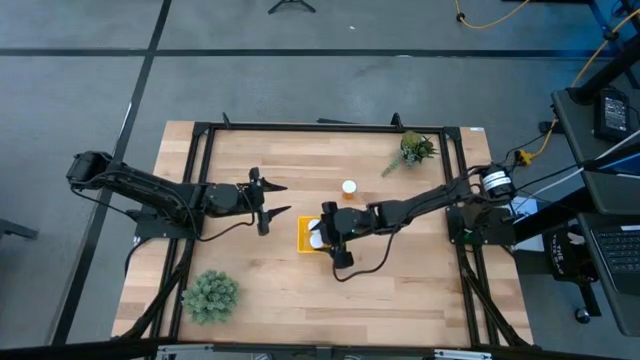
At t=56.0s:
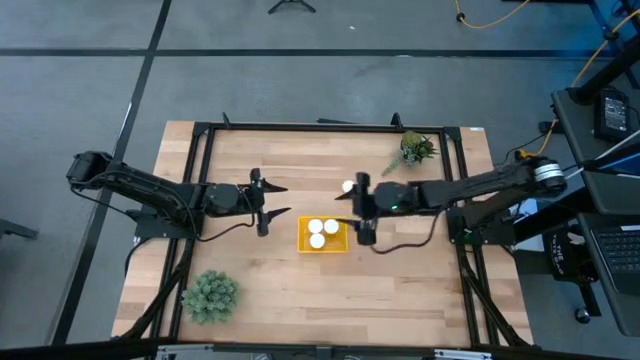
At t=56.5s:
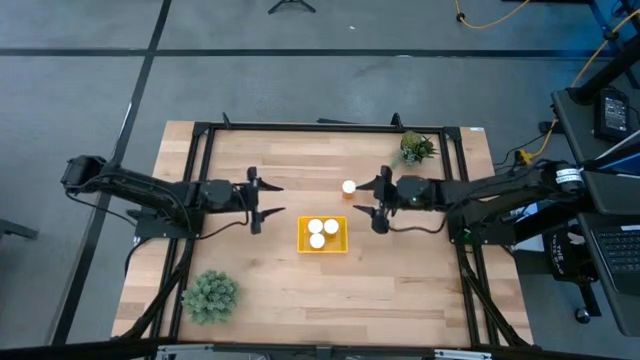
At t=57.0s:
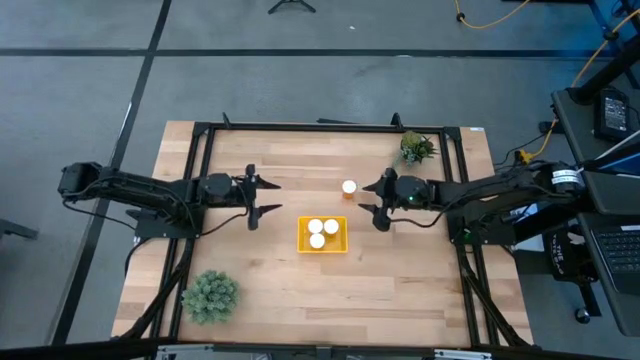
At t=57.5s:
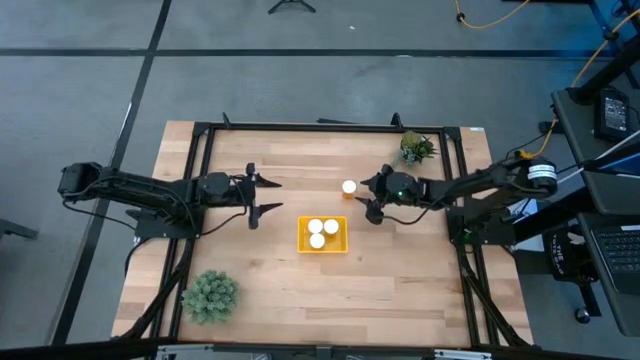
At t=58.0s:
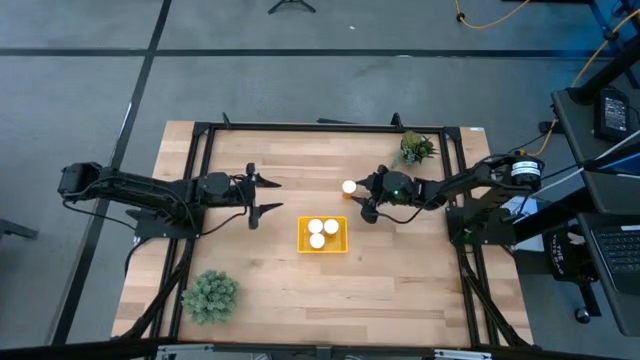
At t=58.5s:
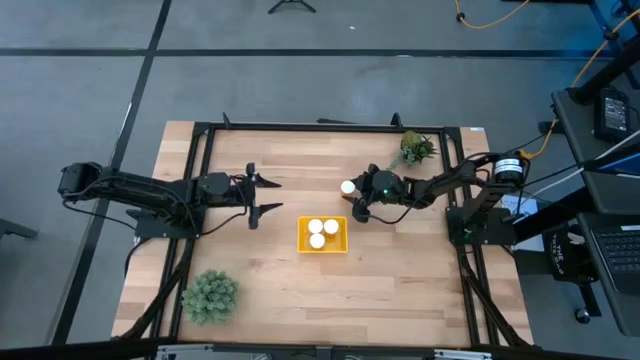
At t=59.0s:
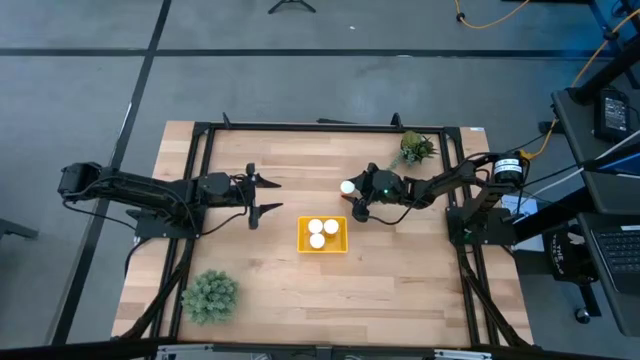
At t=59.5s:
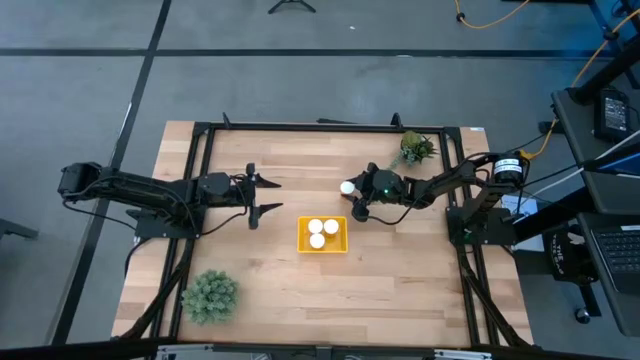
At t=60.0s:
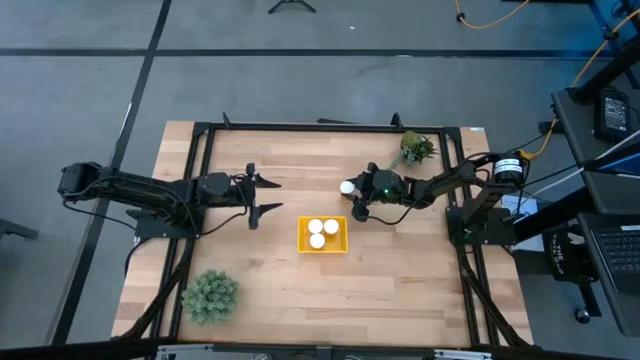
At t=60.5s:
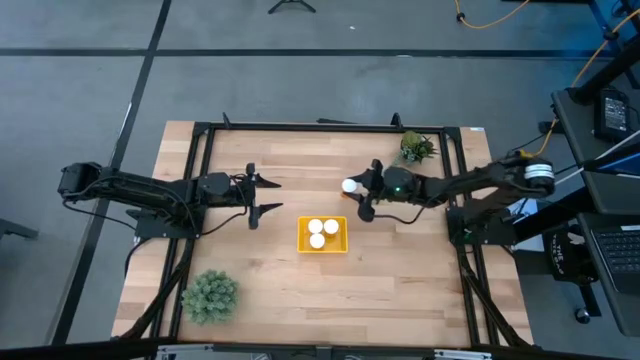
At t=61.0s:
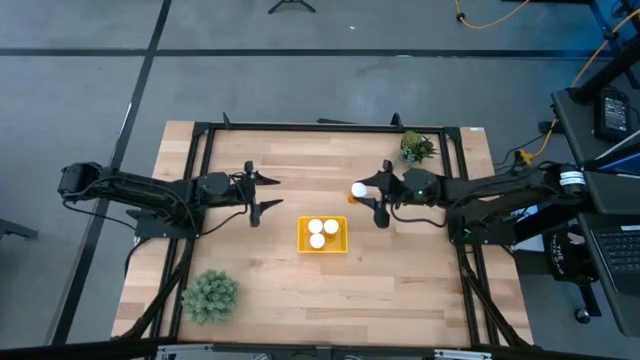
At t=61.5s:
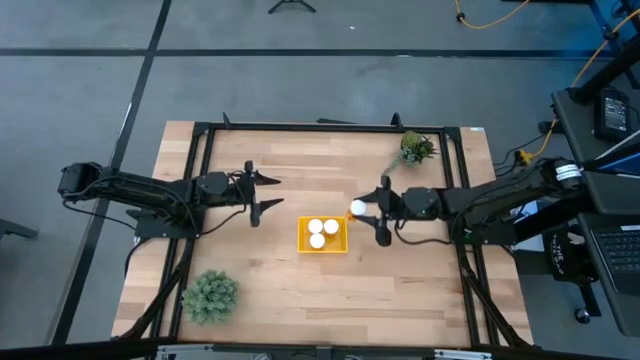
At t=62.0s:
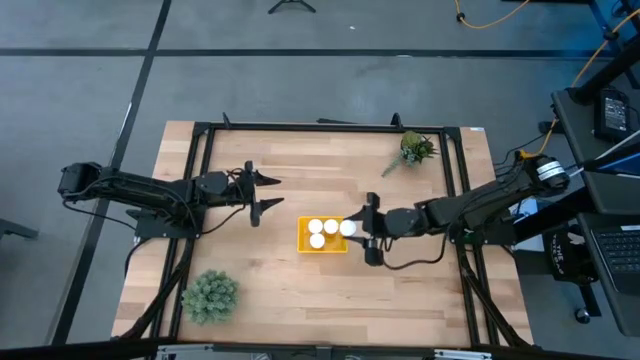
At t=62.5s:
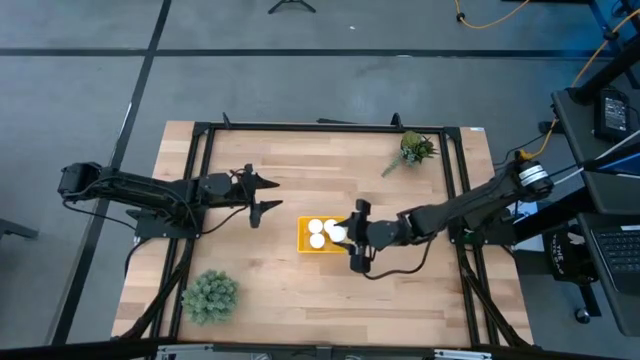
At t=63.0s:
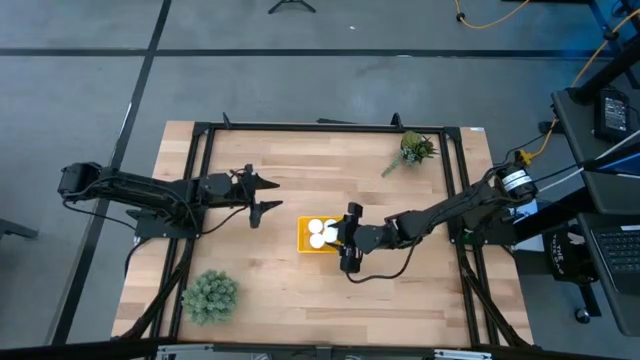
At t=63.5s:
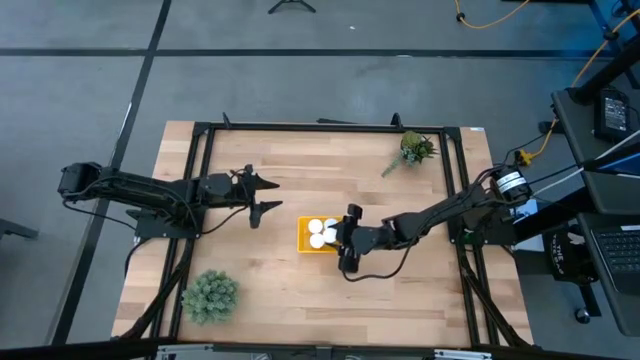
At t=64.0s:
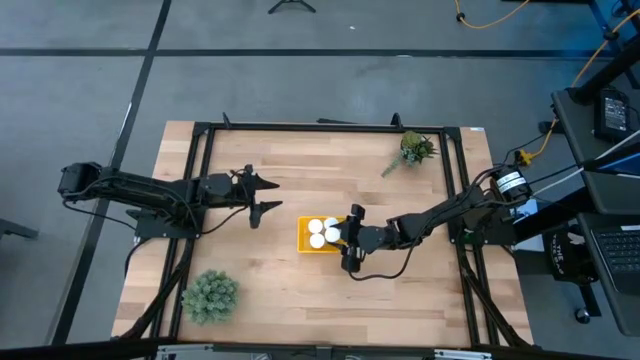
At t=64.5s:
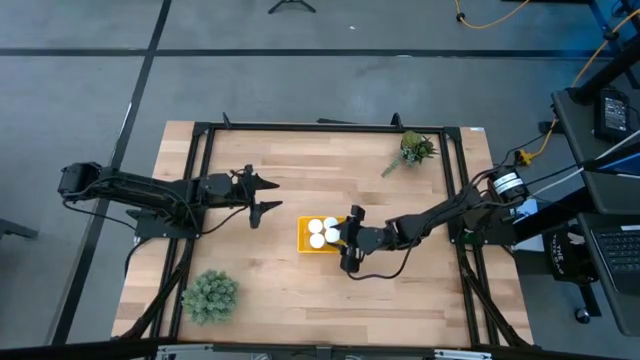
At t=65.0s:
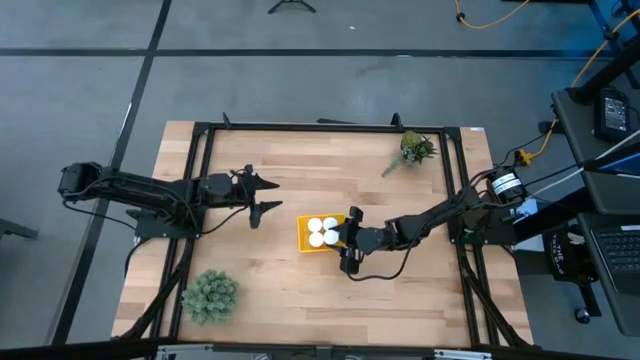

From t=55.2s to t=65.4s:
Task: Pick and place pill bottles into a basket
Put the orange pill bottle into the yellow bin

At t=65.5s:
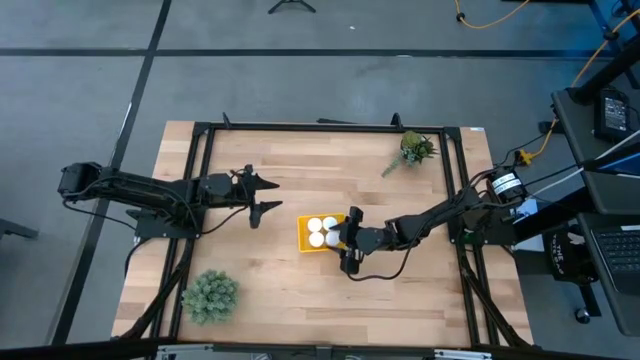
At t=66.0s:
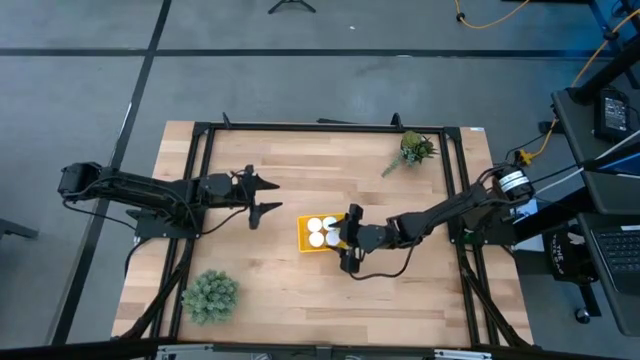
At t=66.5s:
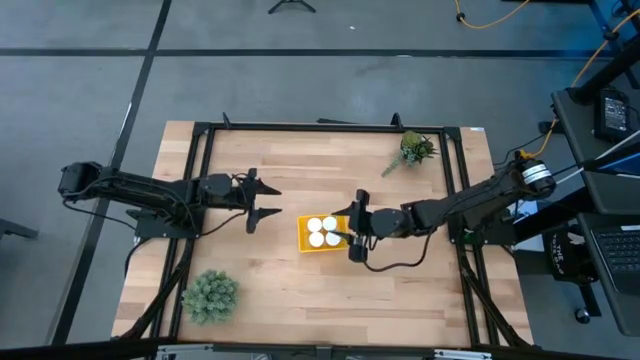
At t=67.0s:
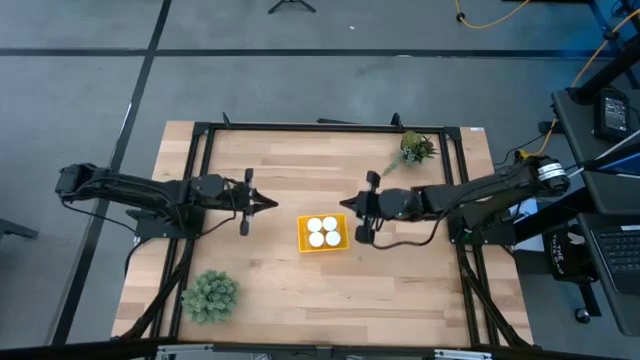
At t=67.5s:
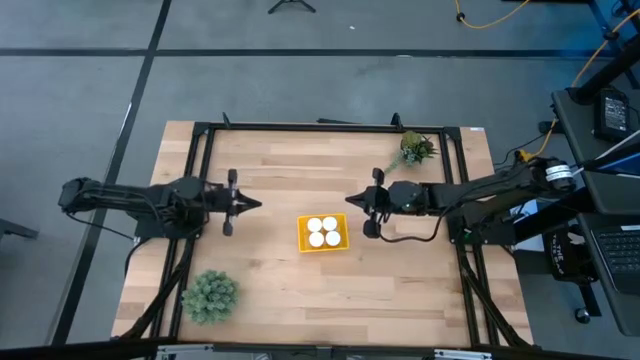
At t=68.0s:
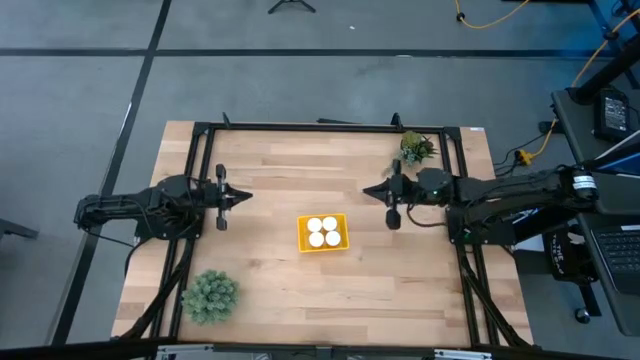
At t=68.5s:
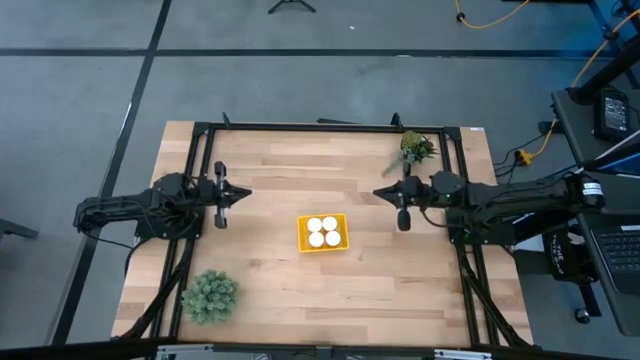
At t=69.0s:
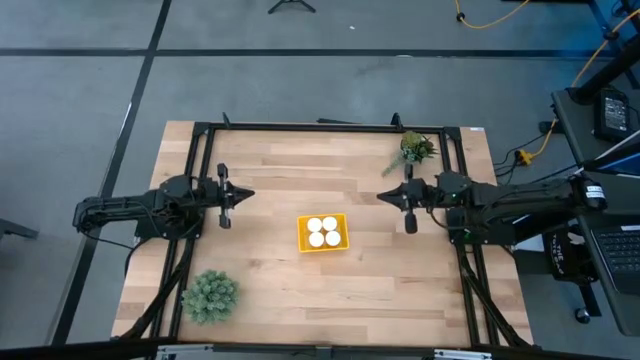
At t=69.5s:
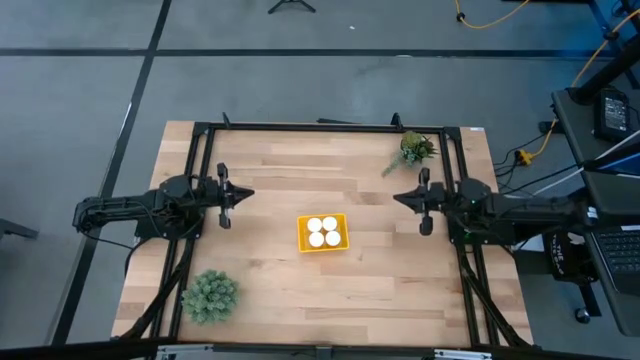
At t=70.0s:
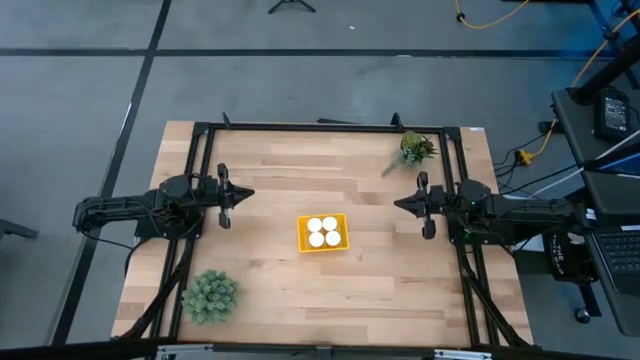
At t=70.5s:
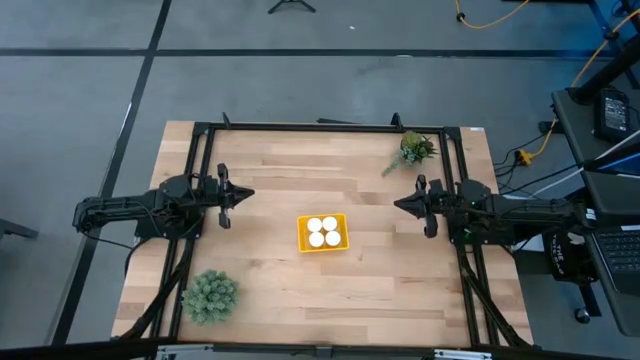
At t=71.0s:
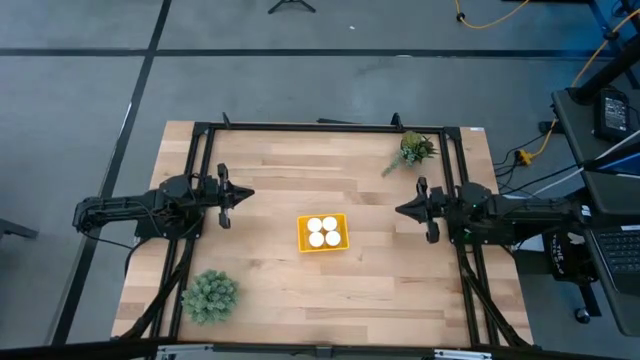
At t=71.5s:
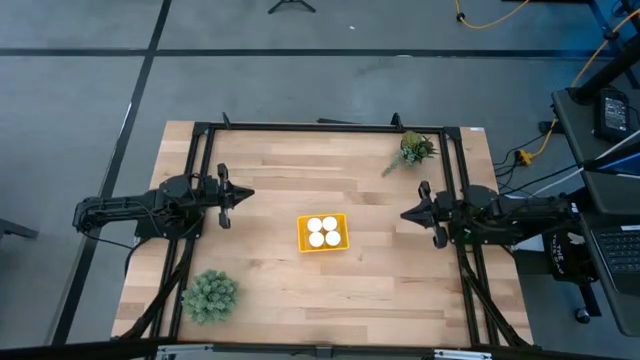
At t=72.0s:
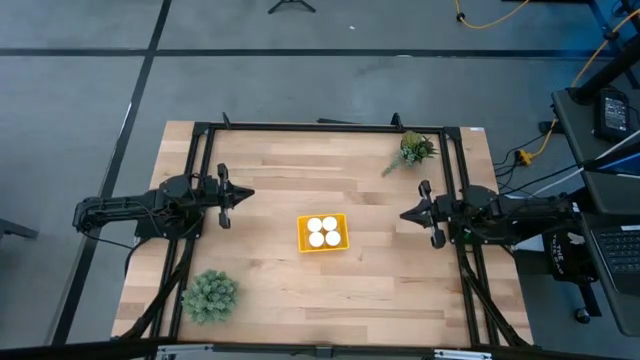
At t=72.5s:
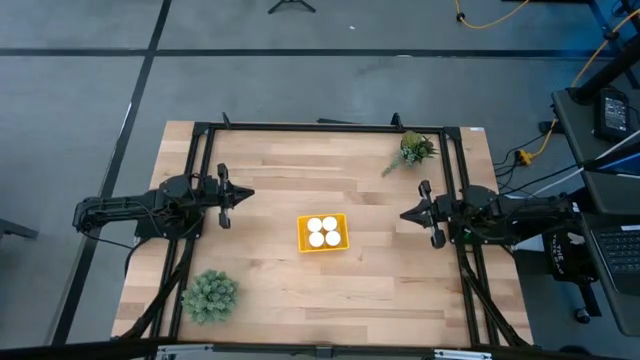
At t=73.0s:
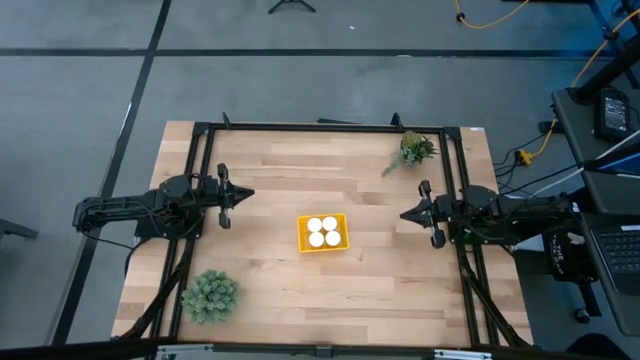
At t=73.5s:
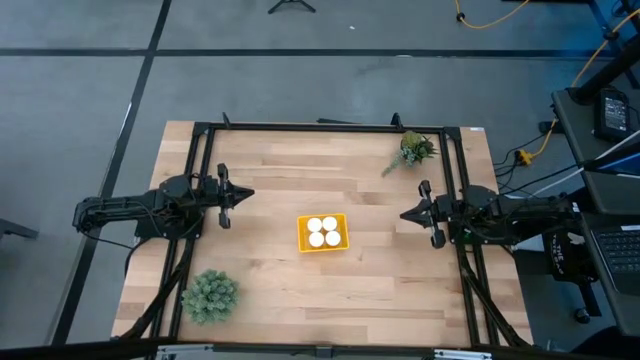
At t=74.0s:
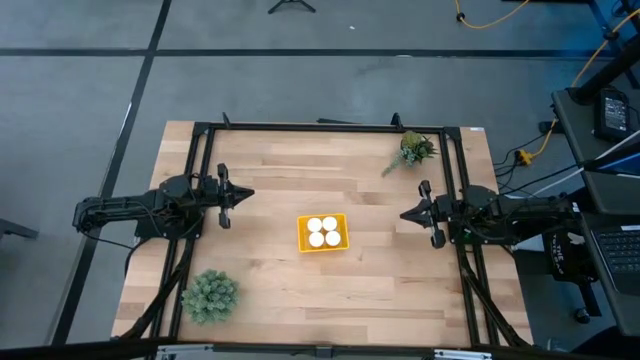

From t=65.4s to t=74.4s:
Return to Home Position

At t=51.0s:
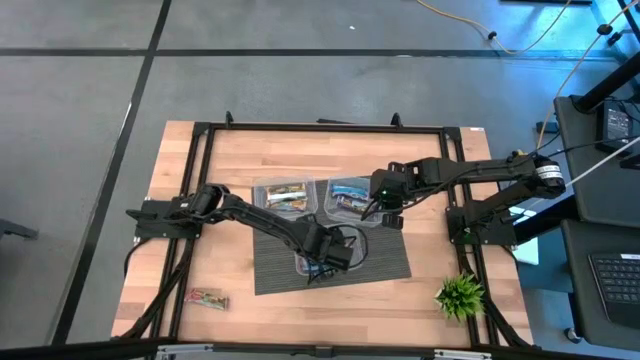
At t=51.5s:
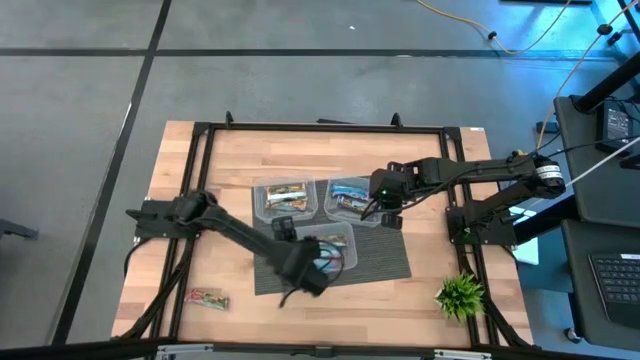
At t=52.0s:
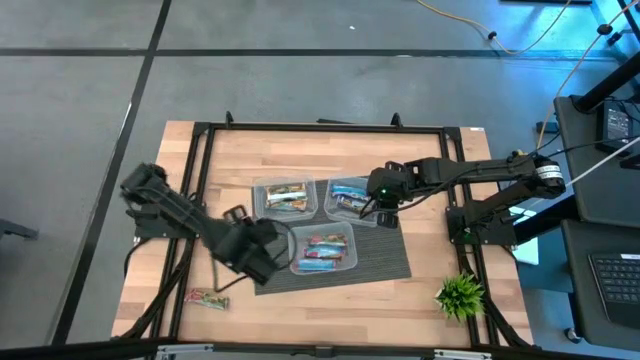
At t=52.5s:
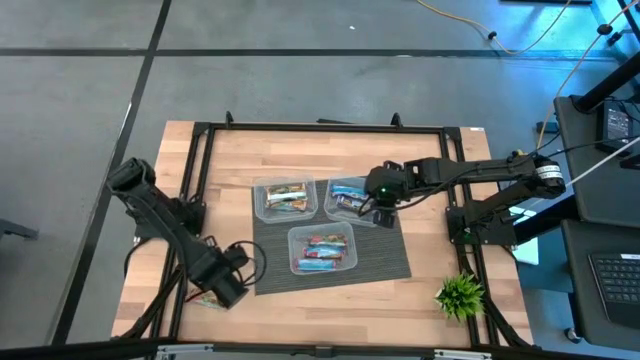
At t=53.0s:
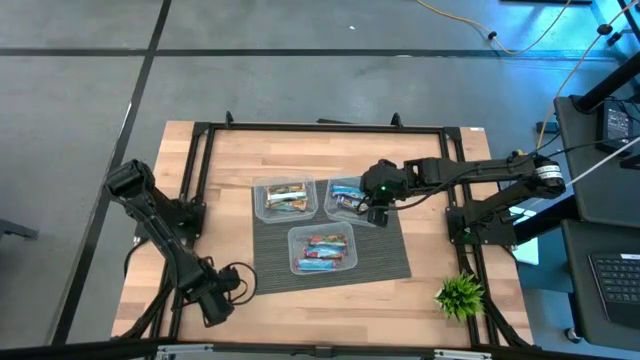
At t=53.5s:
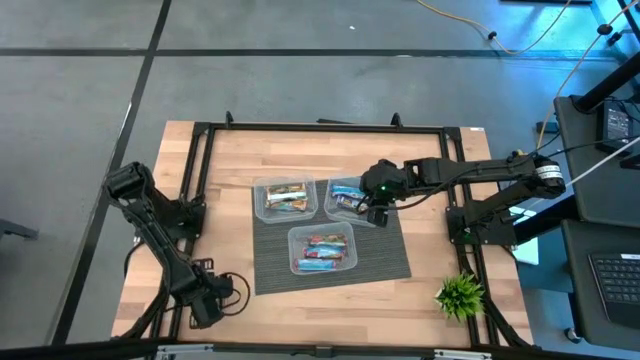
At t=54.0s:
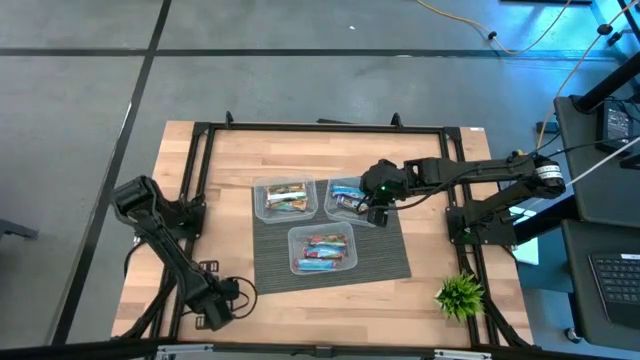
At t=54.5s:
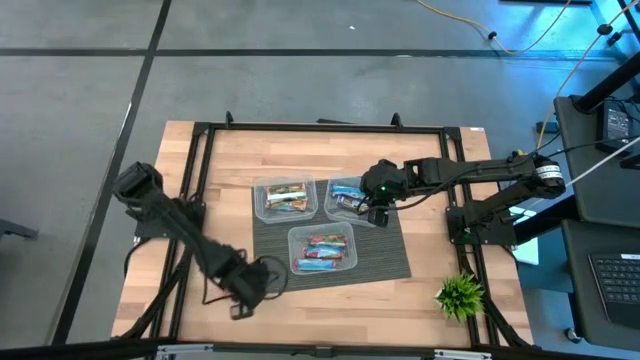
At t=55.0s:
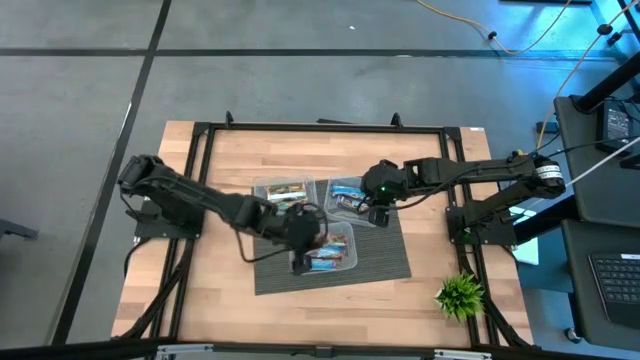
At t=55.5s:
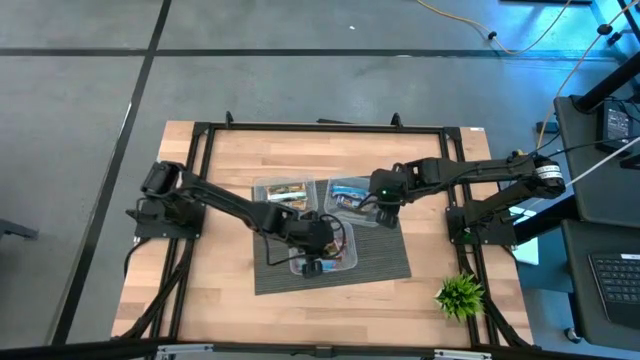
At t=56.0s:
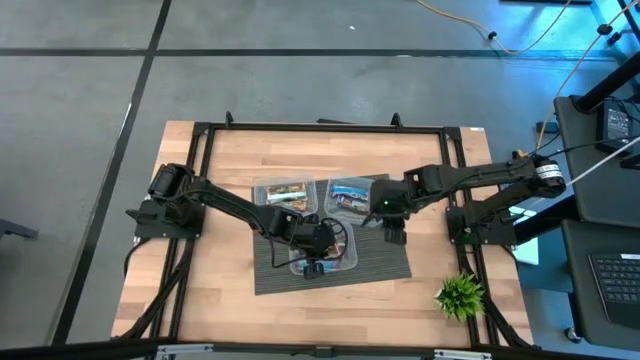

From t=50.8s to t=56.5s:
Task: Pick and place Granola Bars by type
Put the red granola bar into the bottom transparent bin
